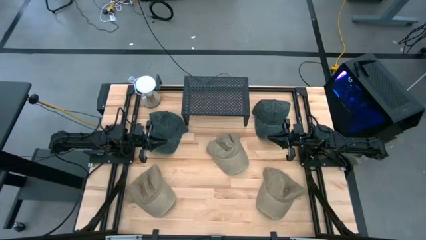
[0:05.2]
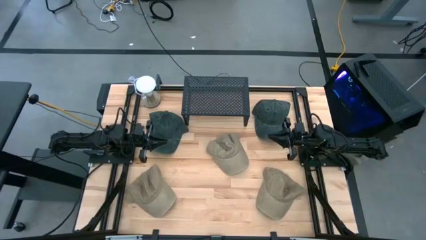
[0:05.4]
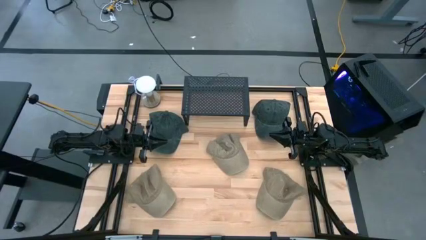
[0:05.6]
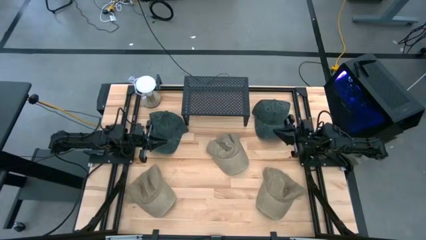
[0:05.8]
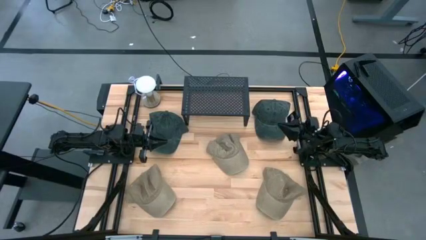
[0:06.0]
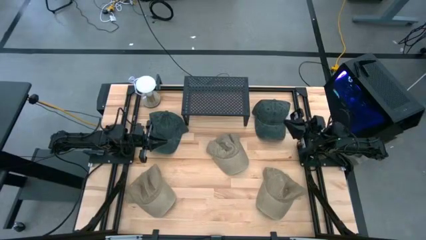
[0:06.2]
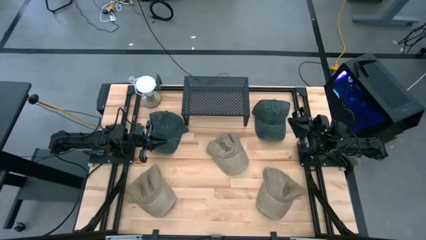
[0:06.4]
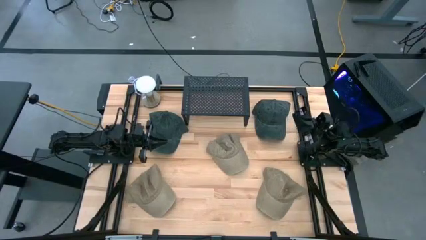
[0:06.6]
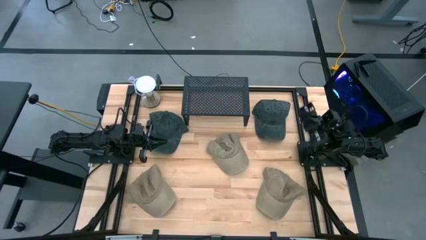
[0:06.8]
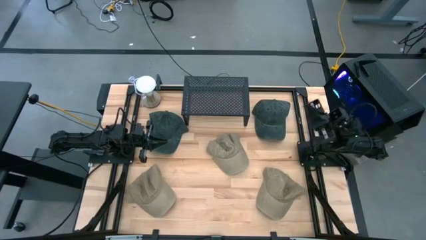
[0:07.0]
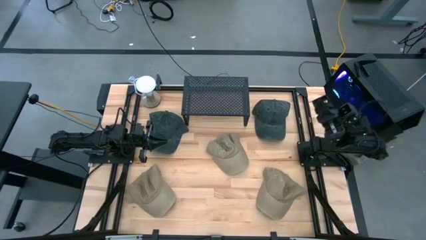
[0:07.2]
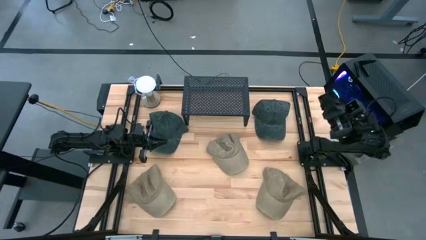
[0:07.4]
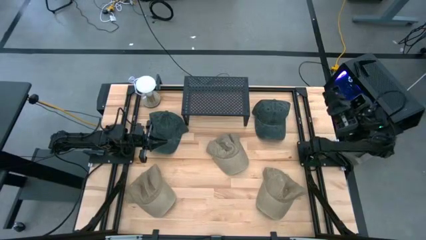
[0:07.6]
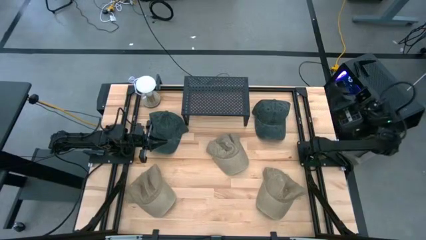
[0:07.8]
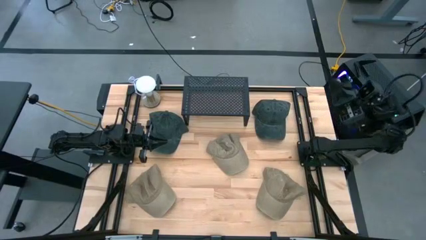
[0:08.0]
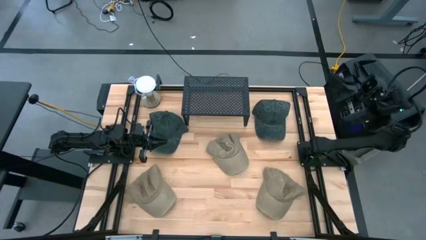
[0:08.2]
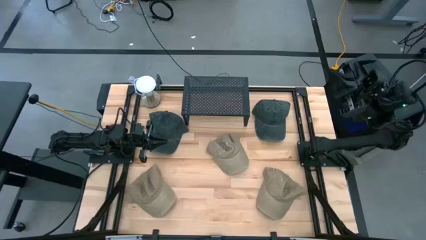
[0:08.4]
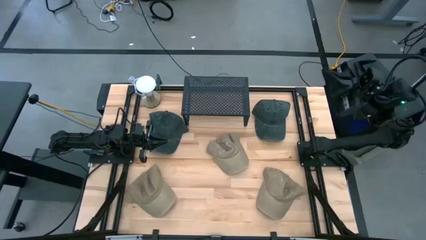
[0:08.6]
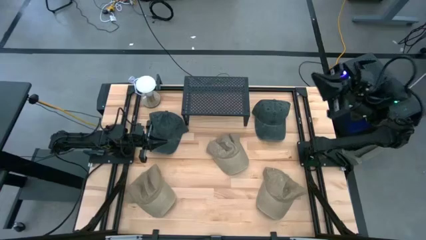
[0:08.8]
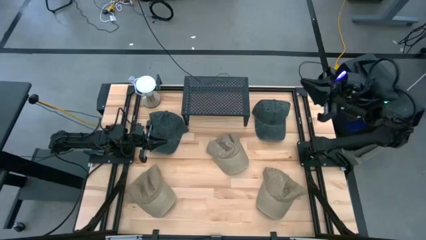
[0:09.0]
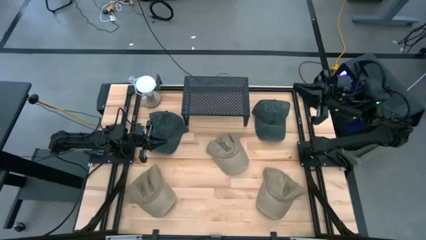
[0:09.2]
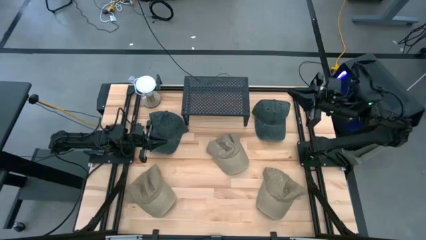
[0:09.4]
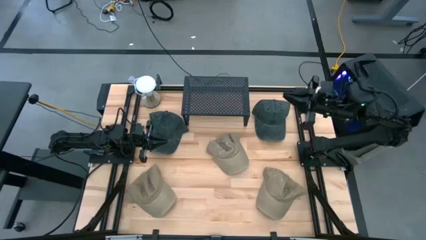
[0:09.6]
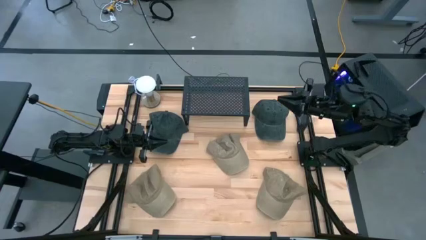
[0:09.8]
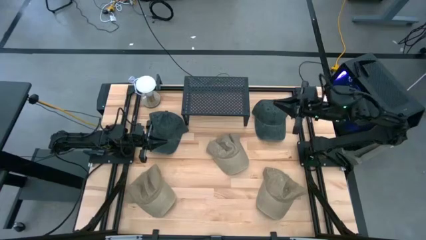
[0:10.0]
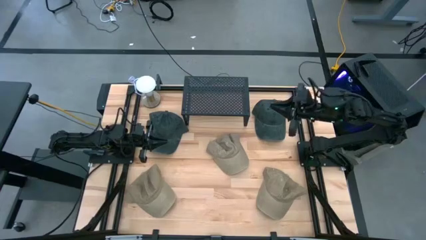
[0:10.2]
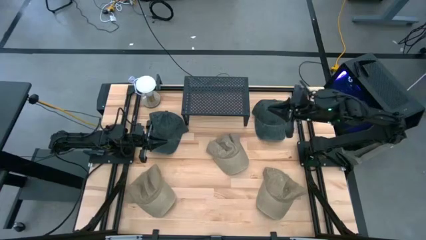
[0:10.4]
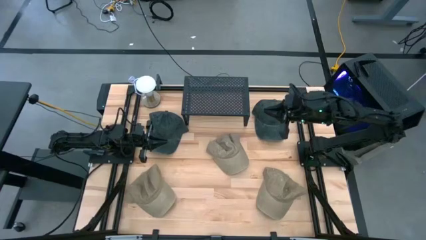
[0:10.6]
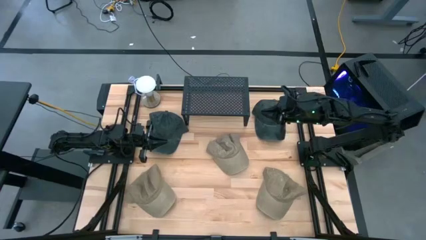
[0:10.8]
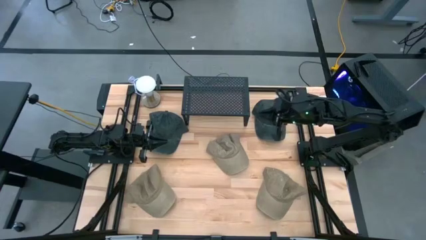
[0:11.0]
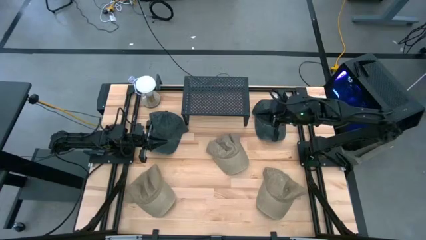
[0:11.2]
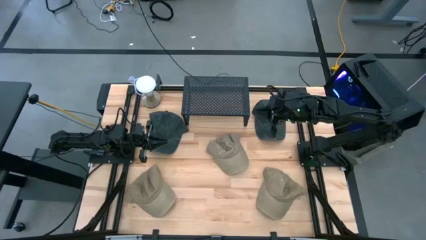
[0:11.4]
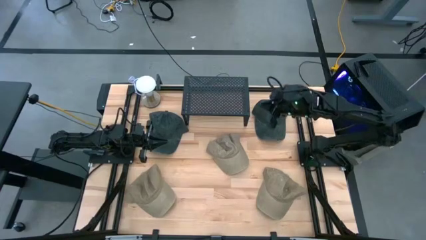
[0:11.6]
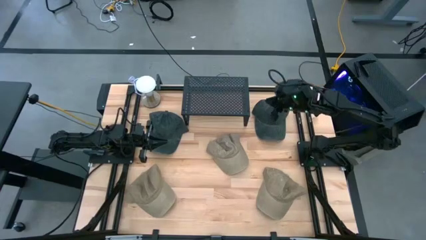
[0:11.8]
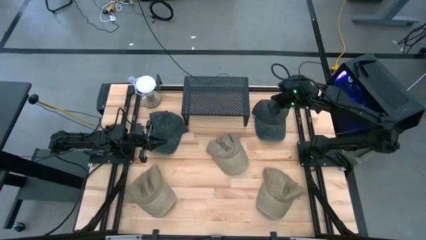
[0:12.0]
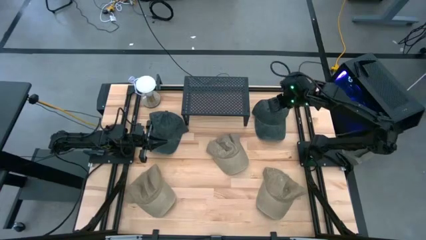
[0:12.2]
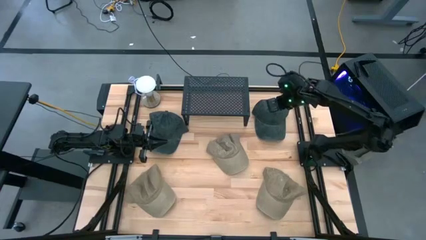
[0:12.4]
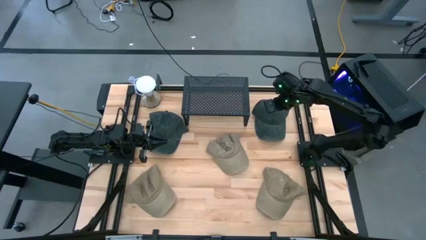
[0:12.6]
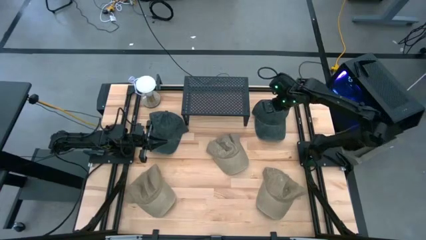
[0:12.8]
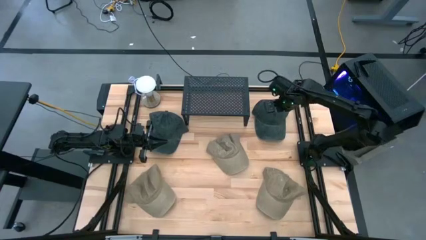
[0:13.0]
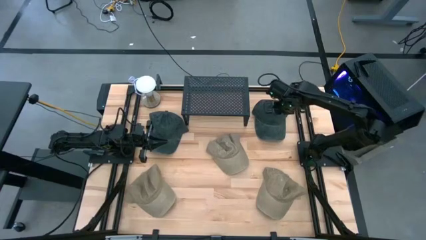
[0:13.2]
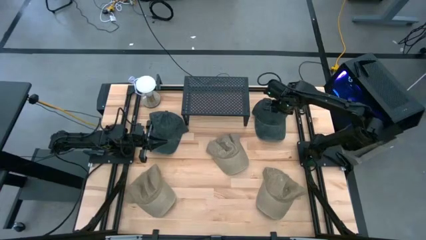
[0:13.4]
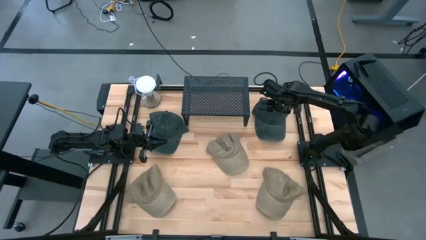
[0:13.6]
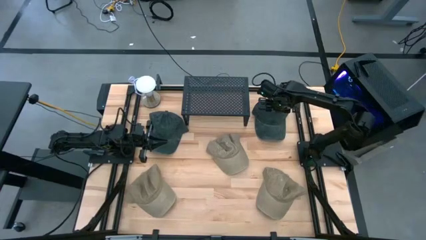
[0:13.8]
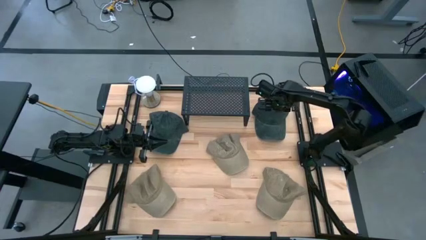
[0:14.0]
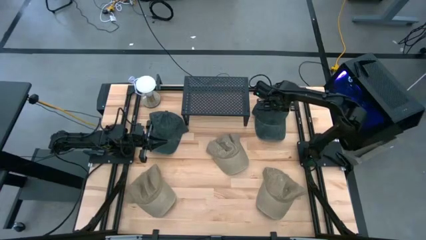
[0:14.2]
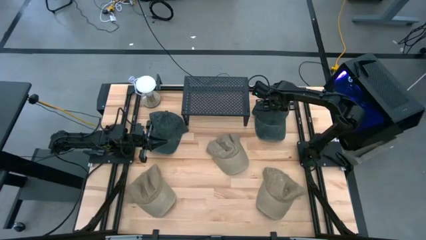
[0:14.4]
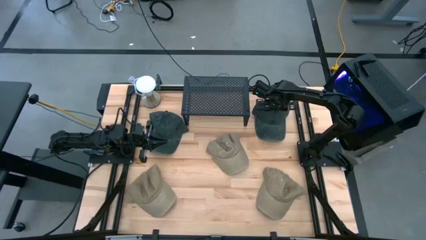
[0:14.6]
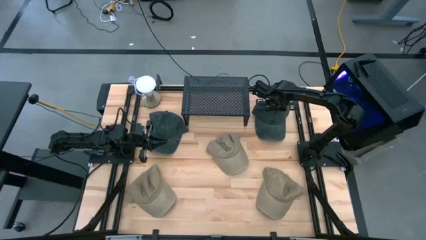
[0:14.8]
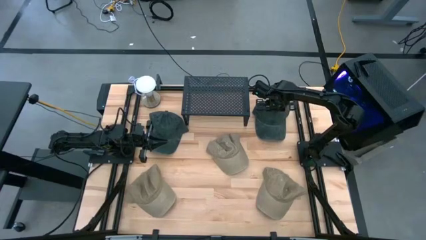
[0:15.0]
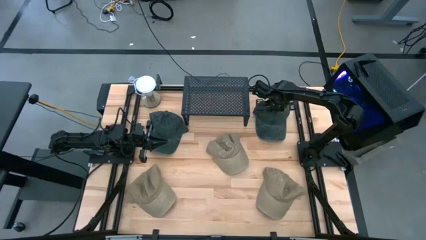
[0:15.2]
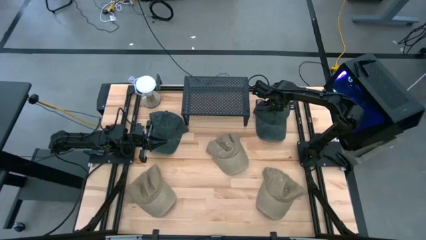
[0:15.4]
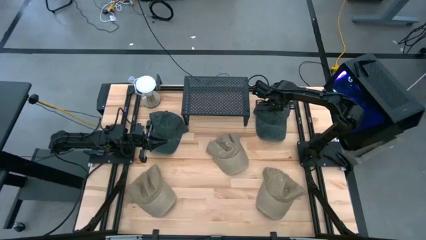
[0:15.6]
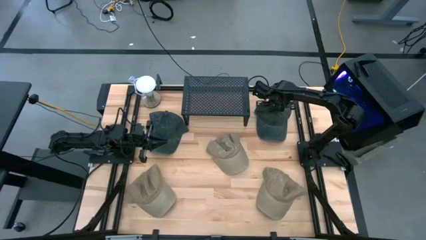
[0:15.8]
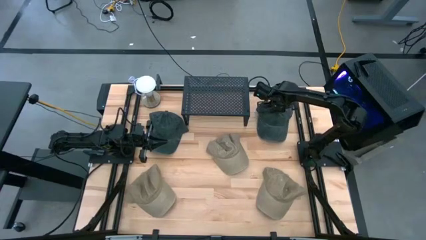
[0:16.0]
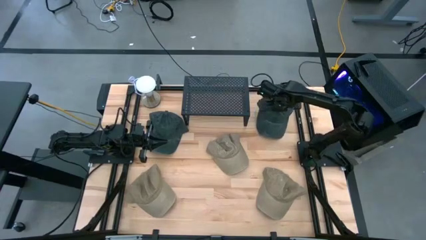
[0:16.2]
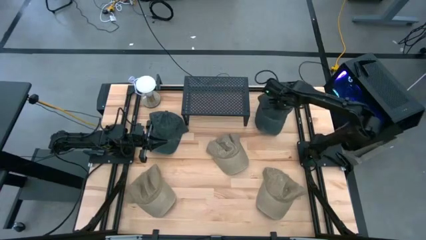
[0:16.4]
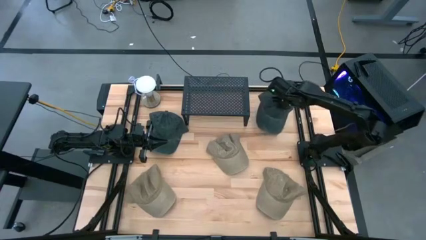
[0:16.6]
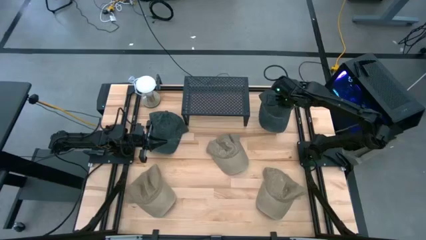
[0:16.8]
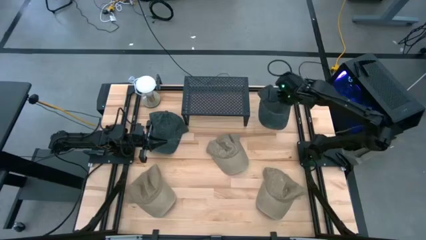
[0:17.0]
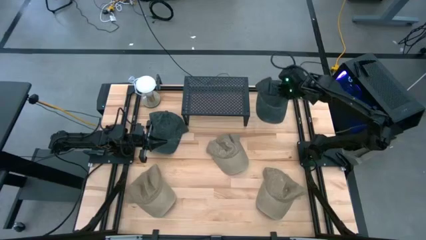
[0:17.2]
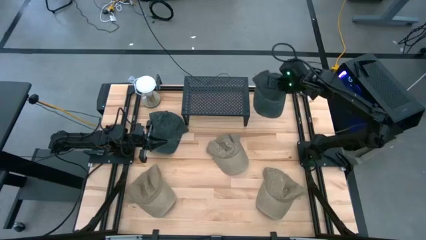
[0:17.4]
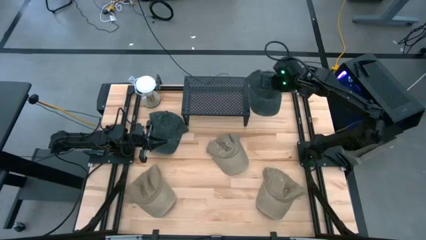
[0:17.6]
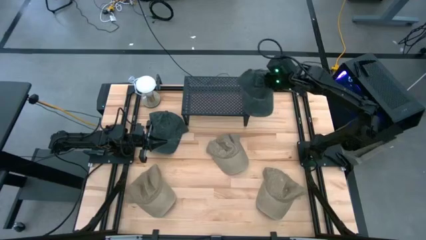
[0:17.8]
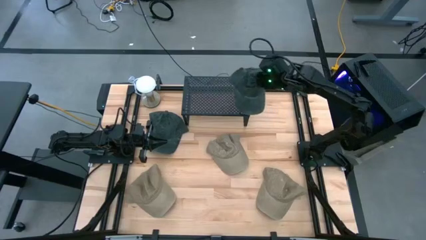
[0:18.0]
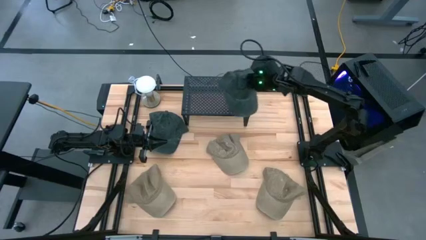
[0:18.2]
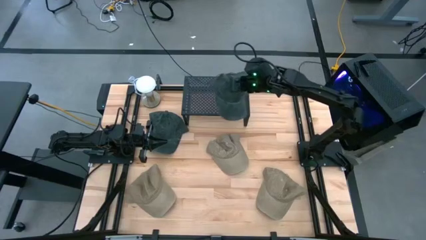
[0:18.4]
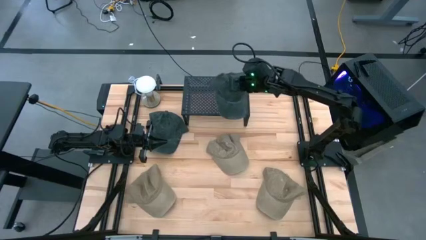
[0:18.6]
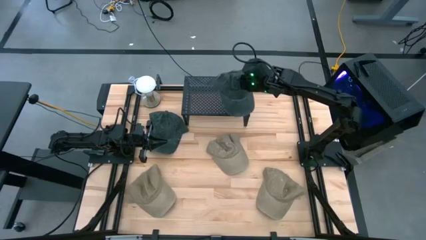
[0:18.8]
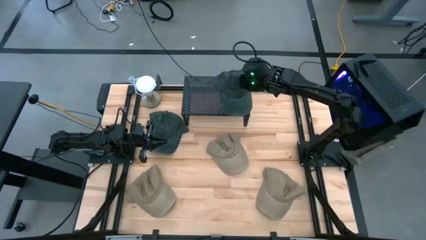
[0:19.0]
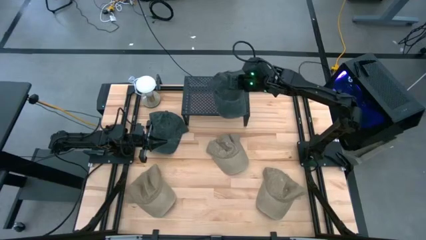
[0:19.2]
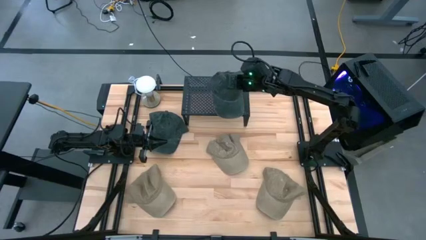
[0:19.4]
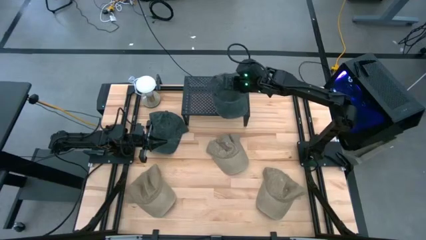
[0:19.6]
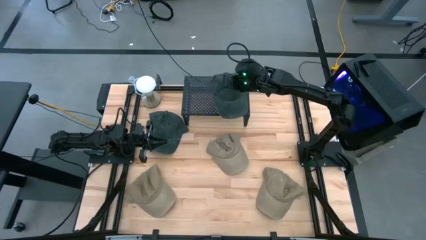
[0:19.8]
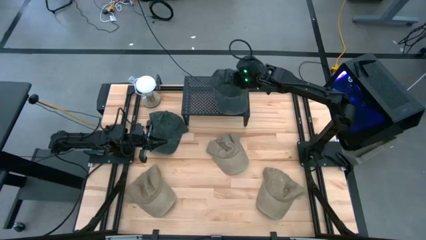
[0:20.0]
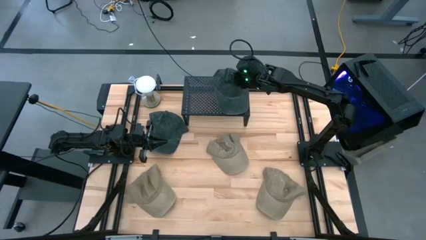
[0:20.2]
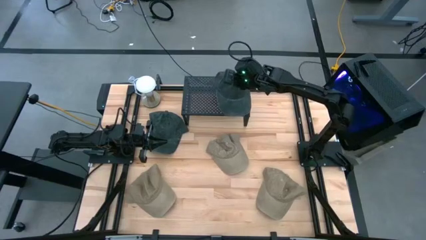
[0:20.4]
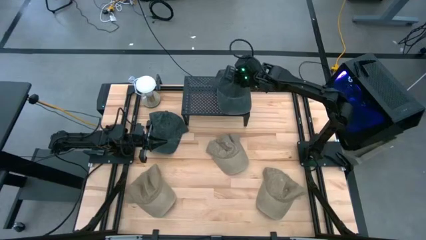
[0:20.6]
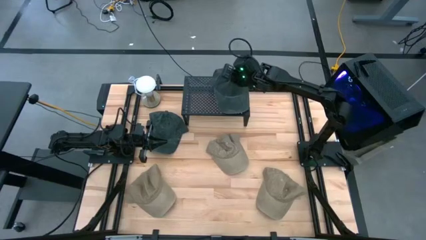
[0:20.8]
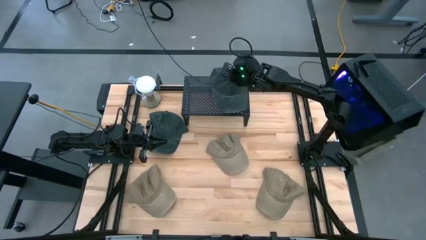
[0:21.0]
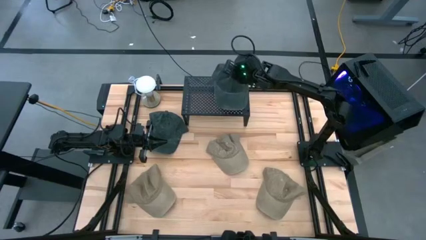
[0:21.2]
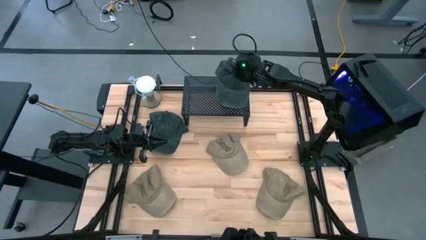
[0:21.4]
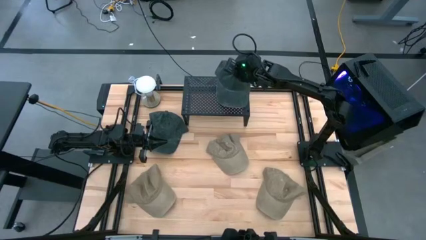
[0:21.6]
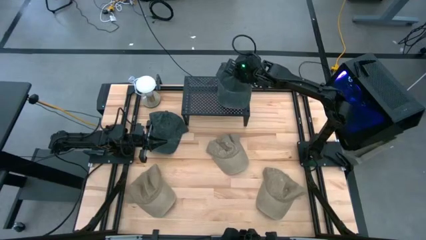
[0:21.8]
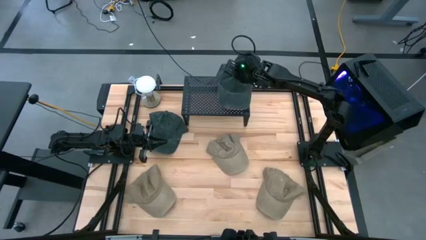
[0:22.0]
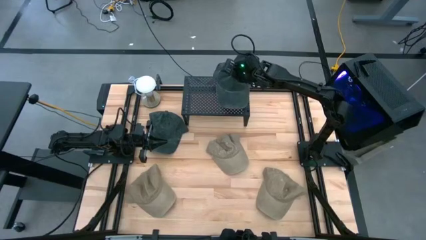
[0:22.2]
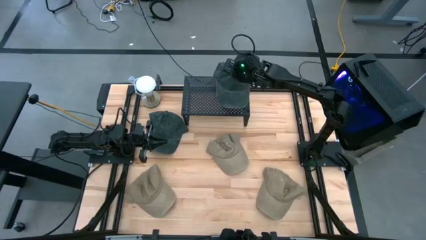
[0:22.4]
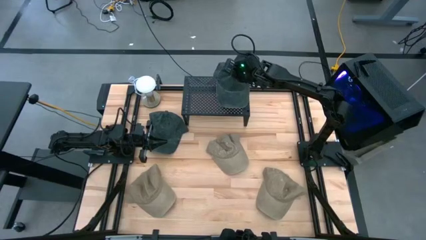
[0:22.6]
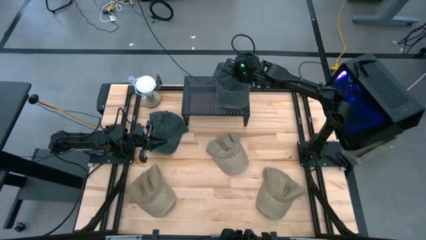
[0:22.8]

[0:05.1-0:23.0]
Task: Pick & Place hat
Put the green cap on the shelf
